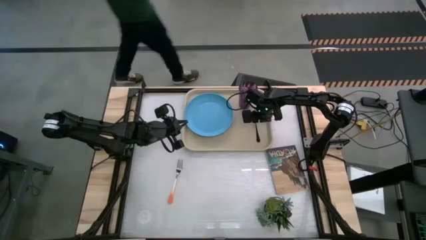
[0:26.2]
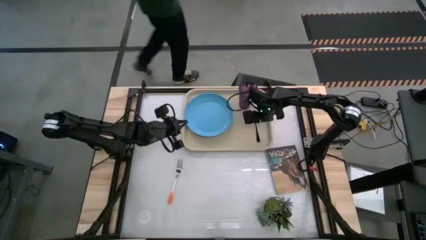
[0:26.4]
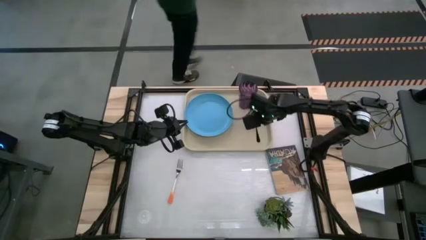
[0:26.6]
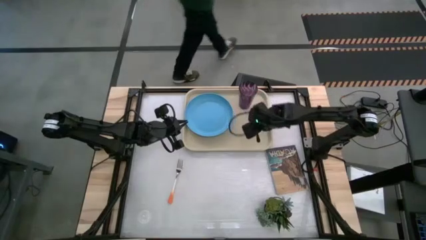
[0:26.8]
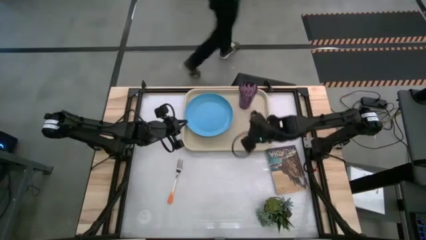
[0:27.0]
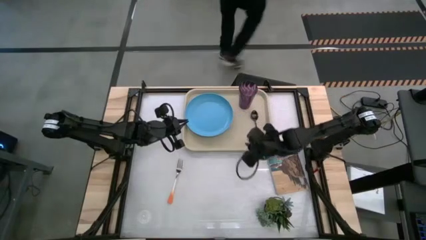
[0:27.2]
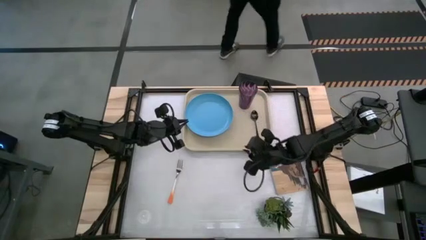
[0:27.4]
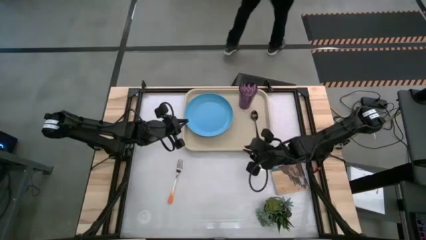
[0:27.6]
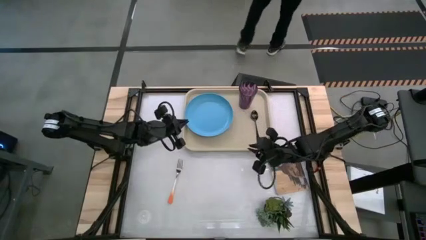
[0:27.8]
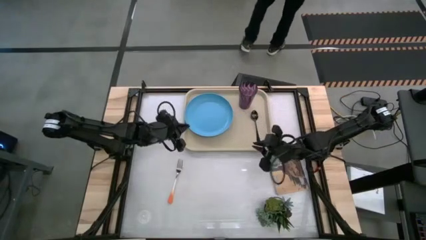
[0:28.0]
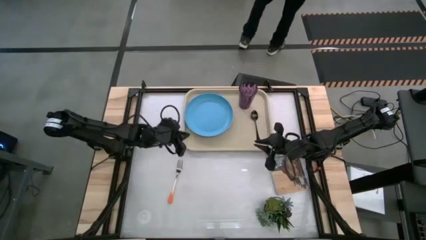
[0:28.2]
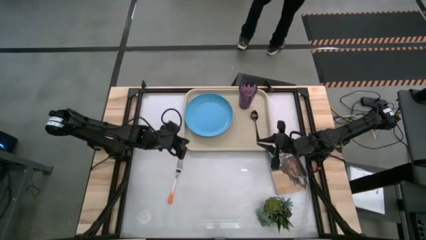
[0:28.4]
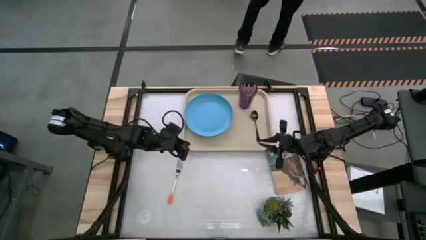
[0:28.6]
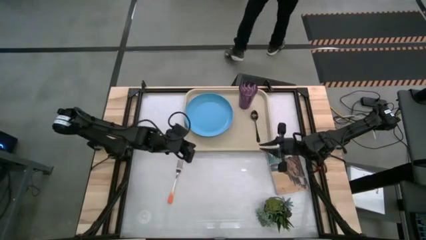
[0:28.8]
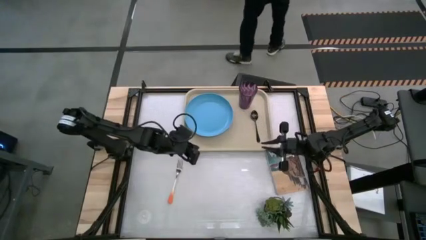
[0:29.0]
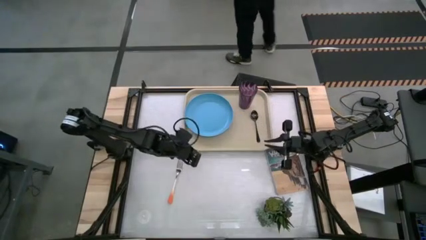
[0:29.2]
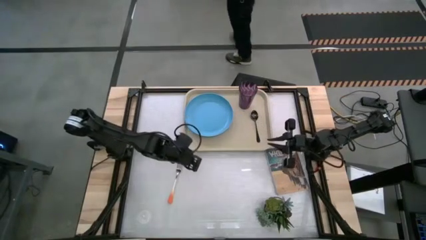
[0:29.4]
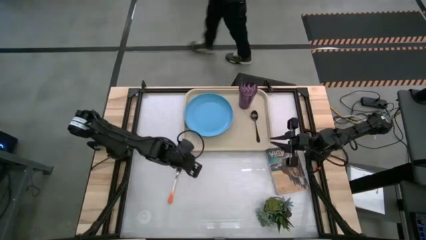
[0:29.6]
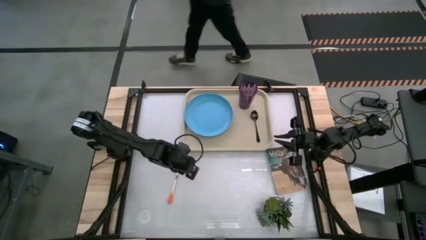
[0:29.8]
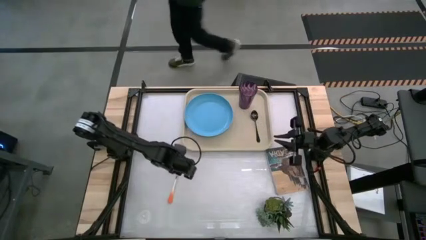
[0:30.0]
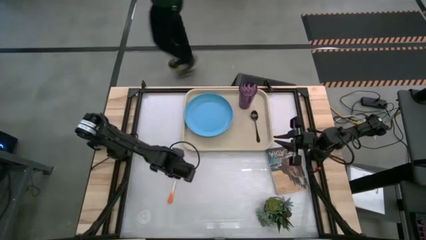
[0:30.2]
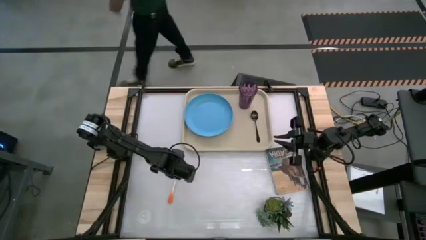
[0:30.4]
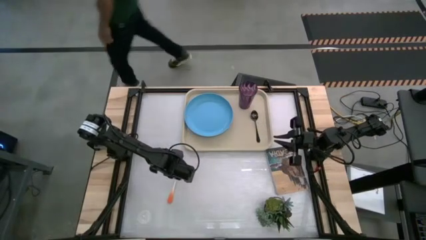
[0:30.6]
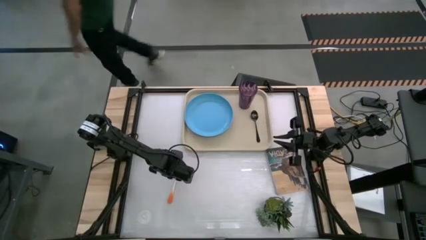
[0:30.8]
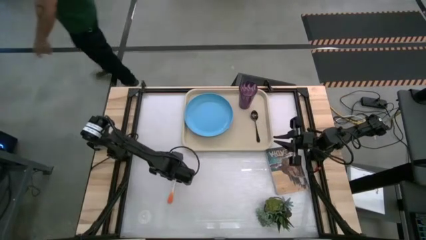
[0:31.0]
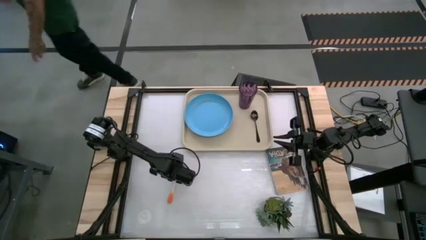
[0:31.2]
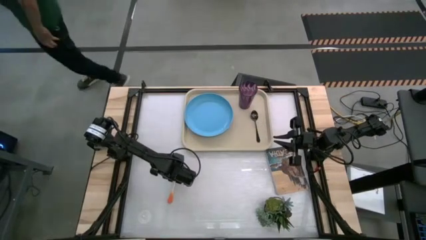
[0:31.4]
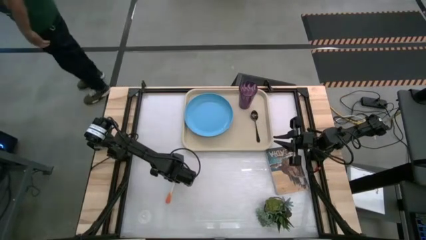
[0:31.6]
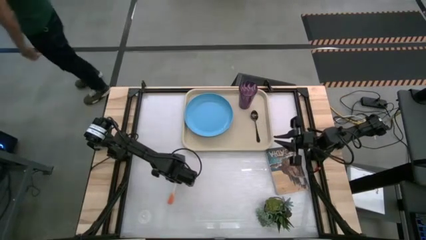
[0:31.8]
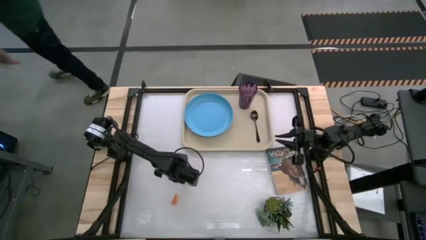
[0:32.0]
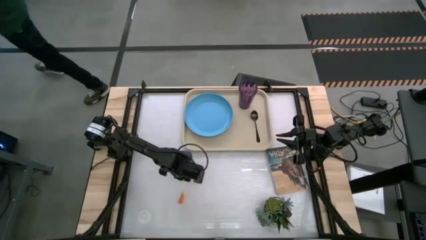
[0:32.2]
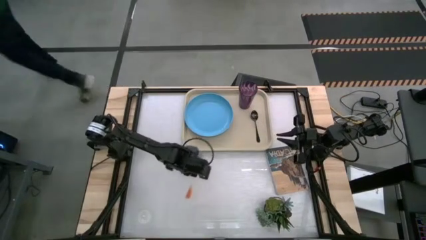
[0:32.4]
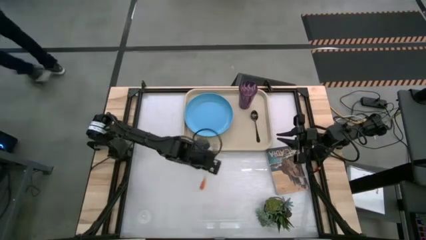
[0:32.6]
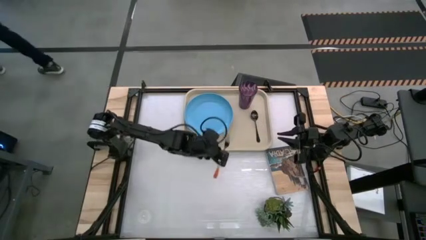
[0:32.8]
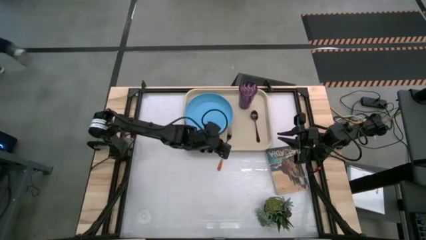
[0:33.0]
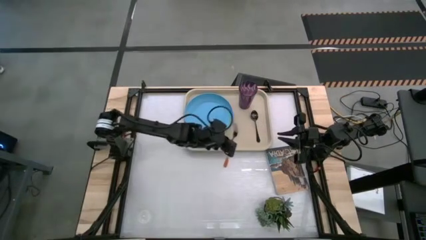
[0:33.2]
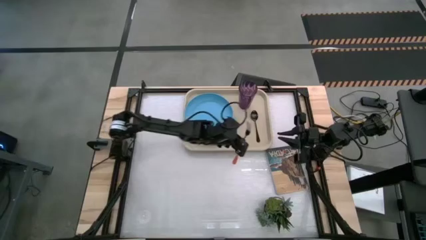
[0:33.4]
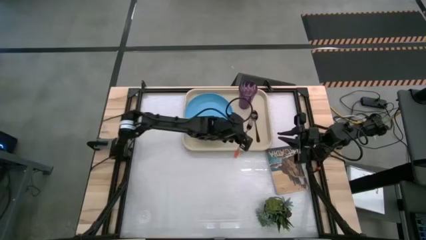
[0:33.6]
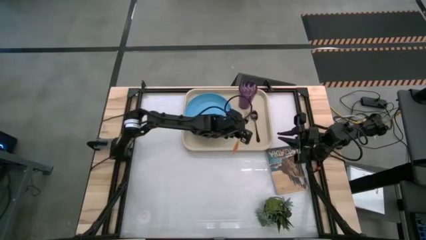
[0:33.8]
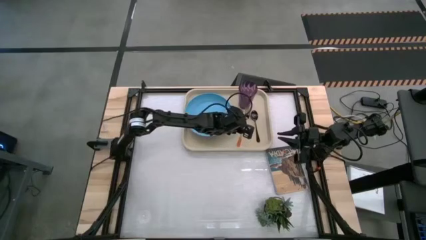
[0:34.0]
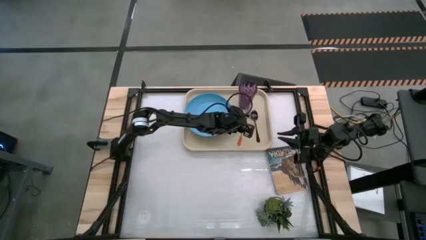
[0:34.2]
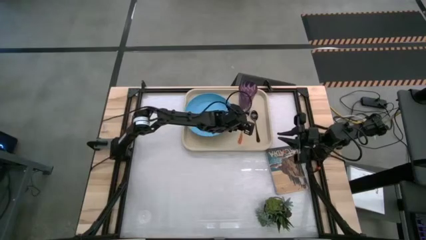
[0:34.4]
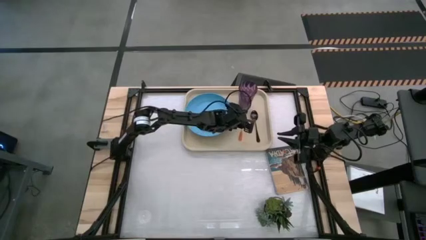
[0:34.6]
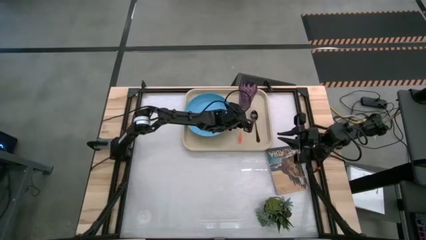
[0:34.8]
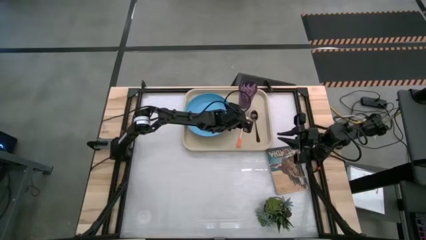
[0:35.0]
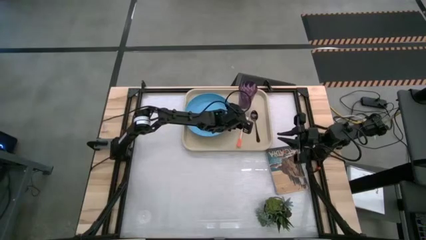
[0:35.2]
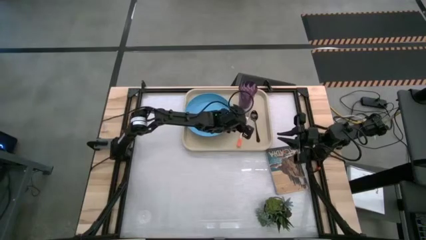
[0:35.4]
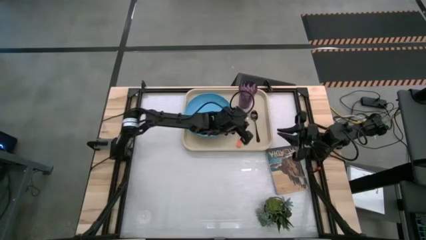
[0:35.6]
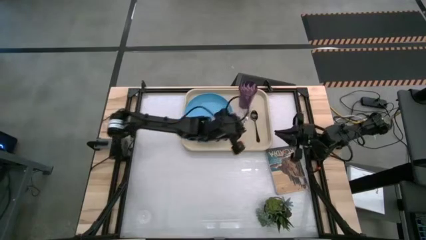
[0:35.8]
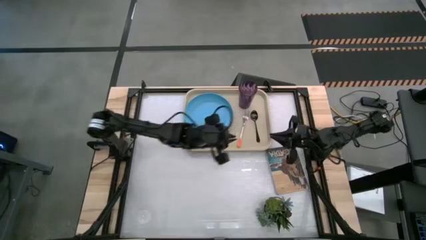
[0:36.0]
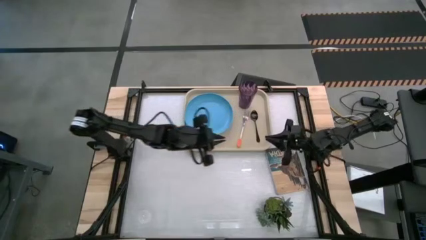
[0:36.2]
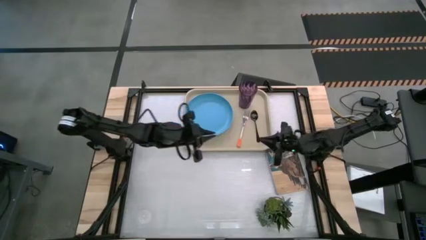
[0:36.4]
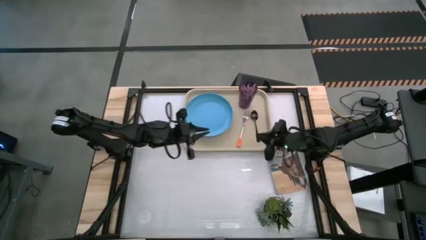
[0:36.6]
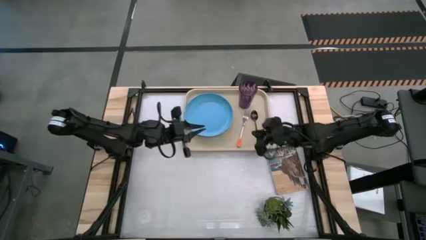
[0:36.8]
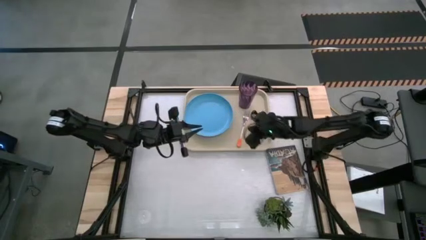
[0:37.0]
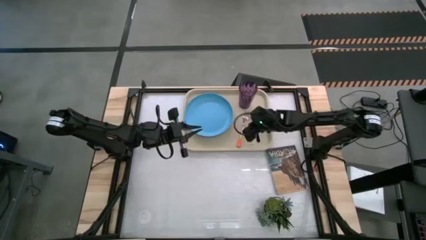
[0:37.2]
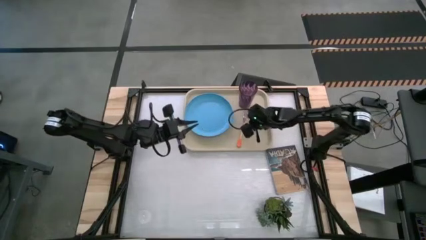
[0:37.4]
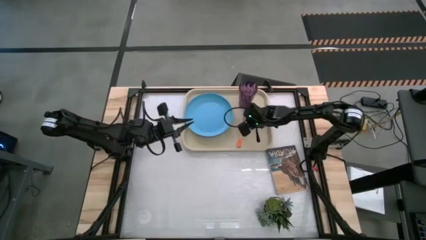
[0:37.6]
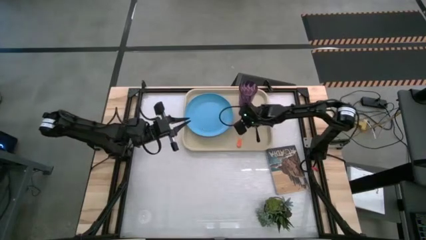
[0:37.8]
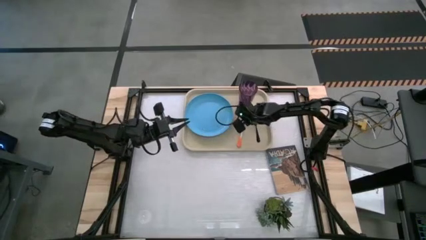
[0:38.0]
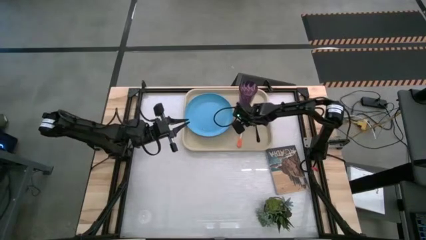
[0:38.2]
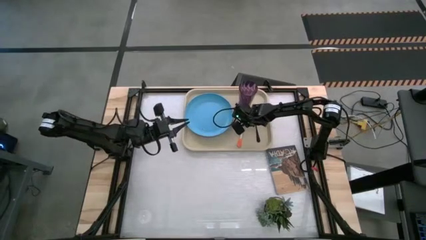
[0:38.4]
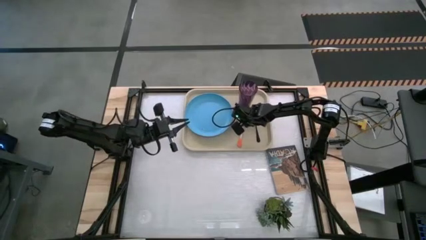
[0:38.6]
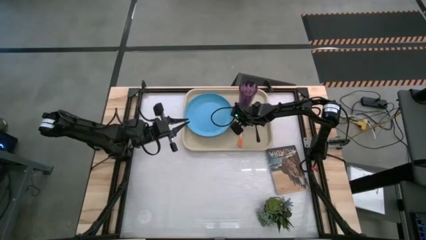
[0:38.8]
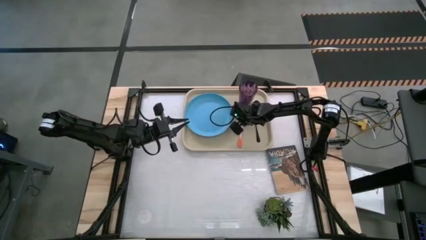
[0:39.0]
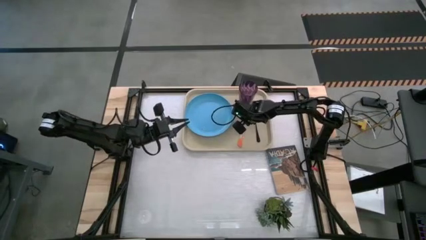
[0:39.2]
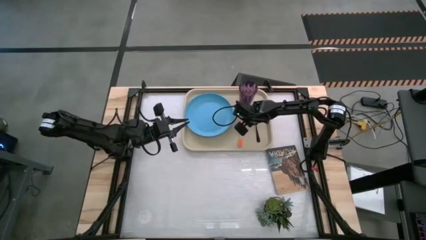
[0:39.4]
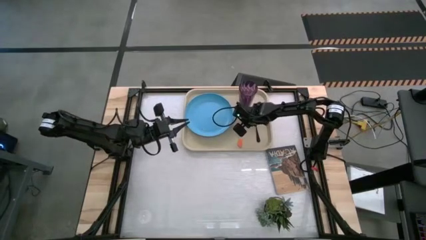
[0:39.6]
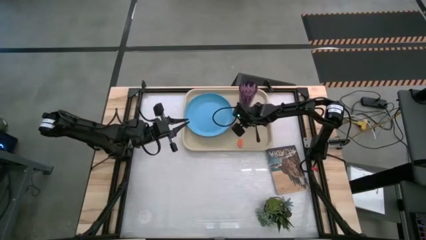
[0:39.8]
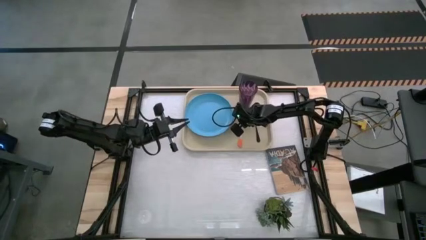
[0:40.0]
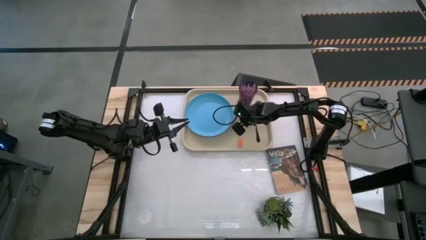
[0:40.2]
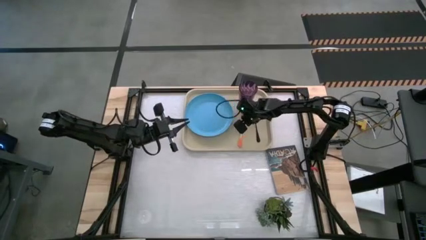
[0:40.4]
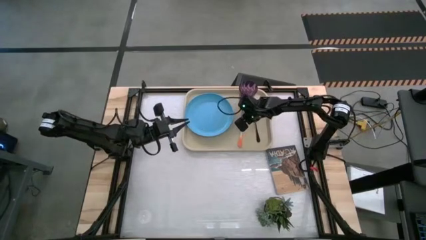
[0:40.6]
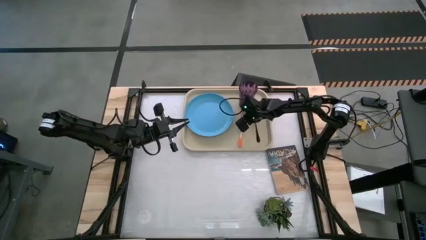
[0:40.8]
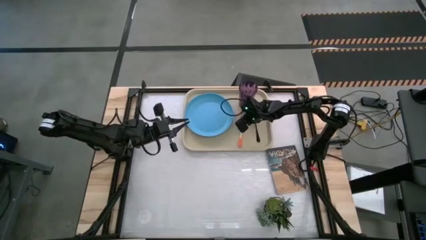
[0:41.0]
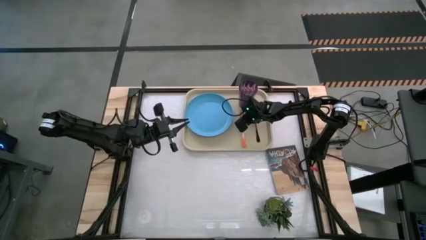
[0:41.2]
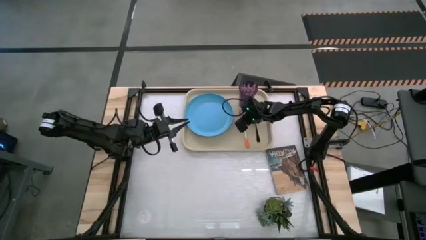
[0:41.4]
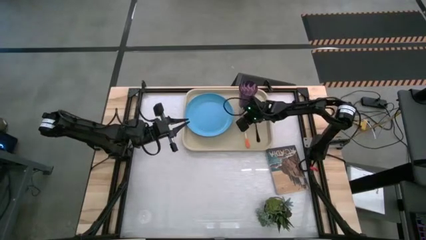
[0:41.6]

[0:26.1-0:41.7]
Task: Pick and place plate/cup/fork/spoon on tray
Put the orange fork to the right of the plate on the tray

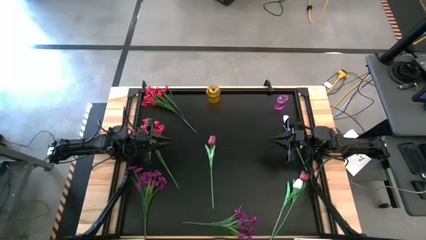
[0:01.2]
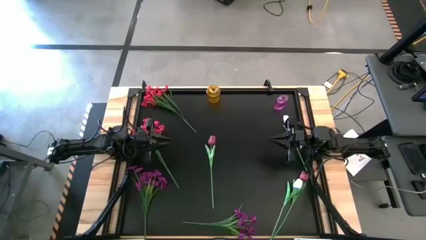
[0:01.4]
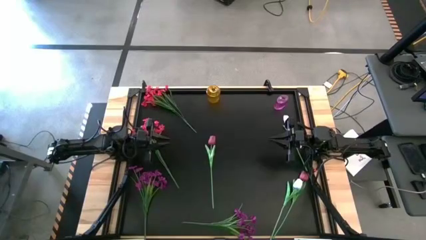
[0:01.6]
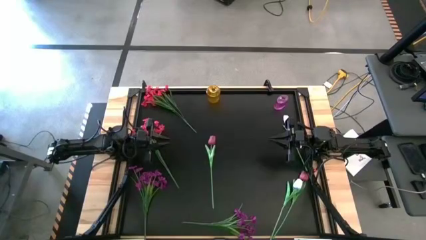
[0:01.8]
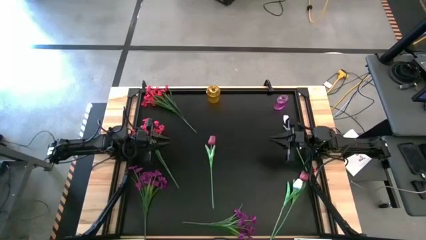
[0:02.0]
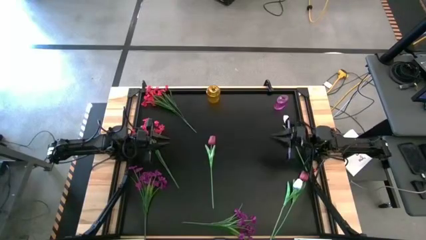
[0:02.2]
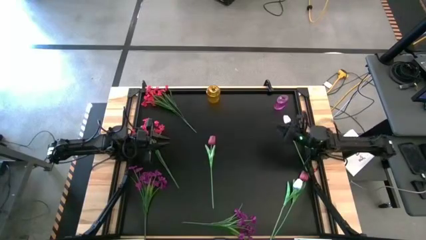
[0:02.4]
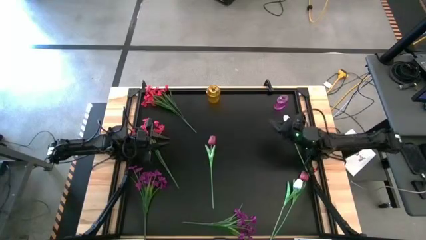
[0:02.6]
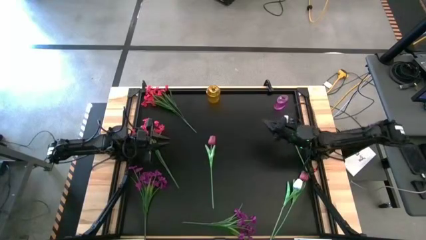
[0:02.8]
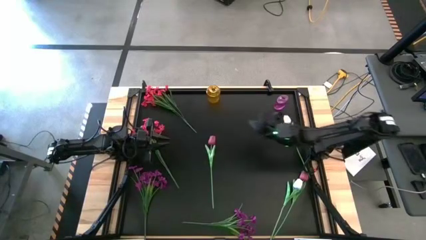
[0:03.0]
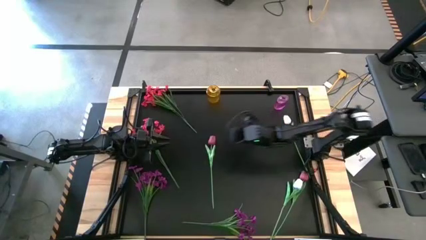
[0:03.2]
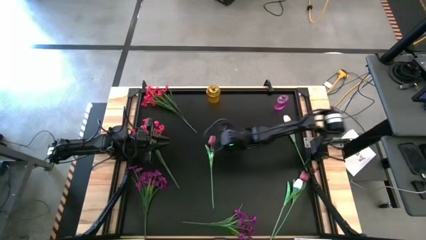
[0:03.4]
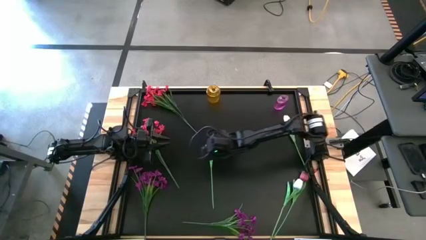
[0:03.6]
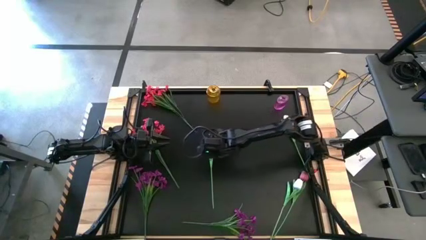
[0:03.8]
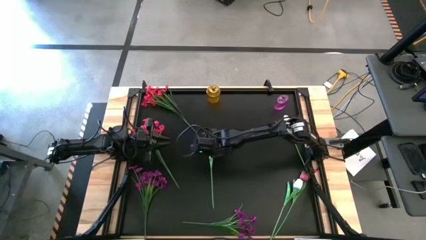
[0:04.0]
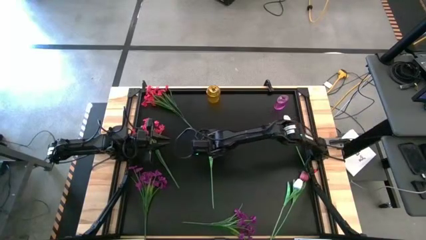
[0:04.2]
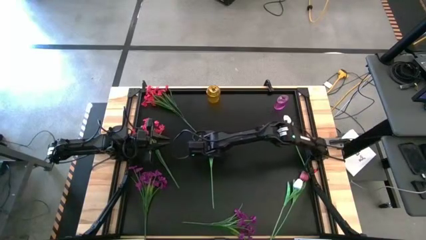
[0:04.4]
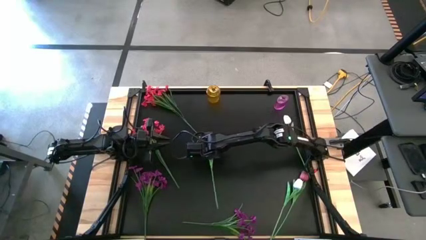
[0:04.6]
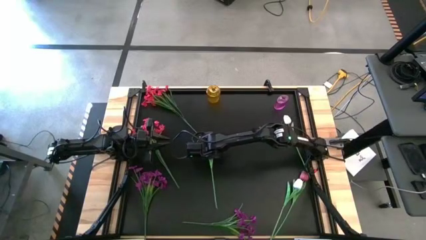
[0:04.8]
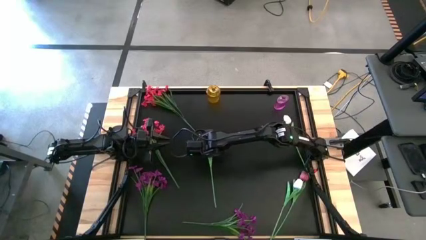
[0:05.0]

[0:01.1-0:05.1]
Task: Sort flowers into vase by color
Put the left pink tulip into the yellow flower vase
